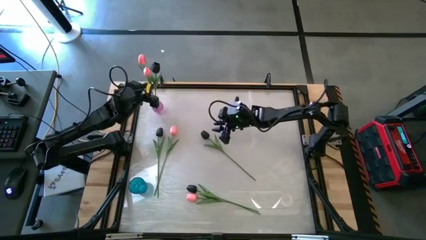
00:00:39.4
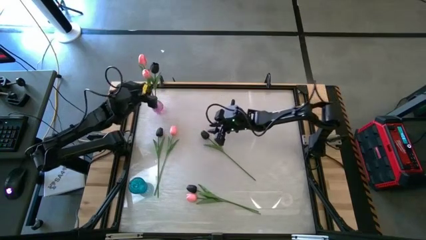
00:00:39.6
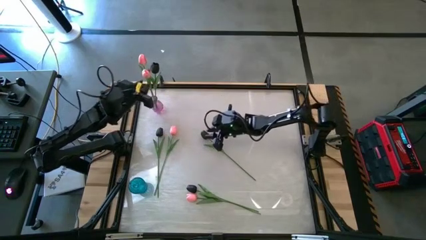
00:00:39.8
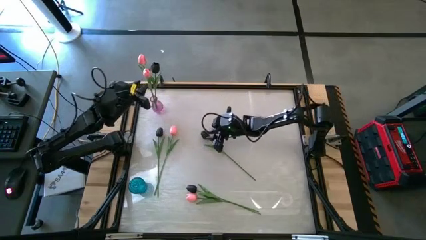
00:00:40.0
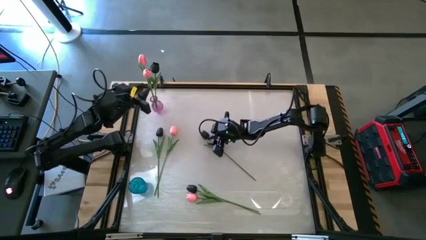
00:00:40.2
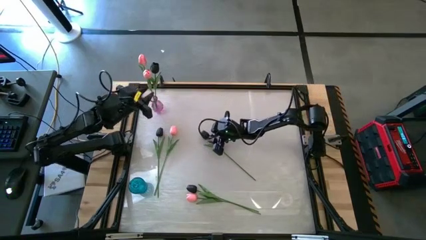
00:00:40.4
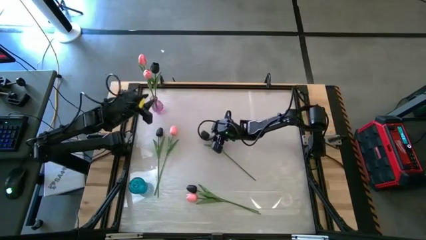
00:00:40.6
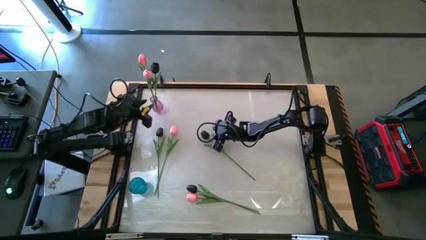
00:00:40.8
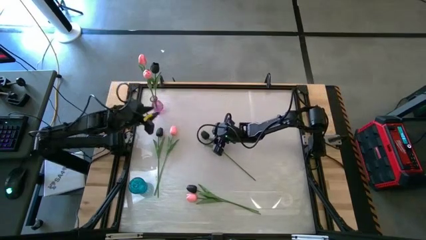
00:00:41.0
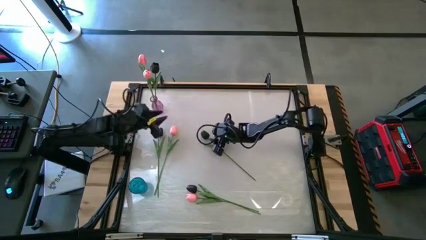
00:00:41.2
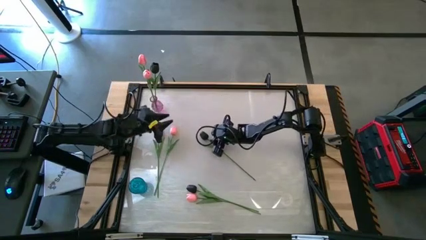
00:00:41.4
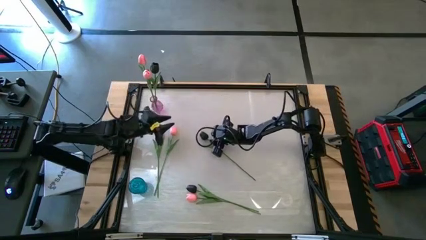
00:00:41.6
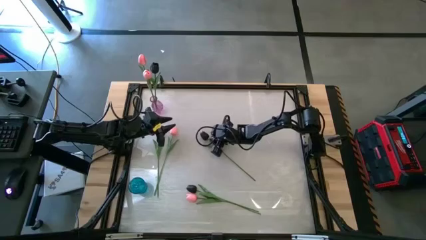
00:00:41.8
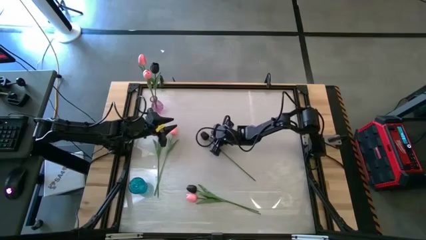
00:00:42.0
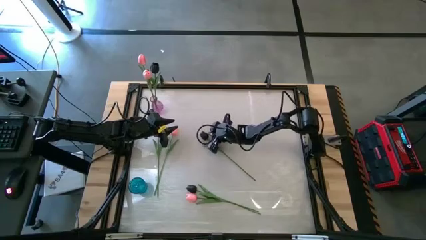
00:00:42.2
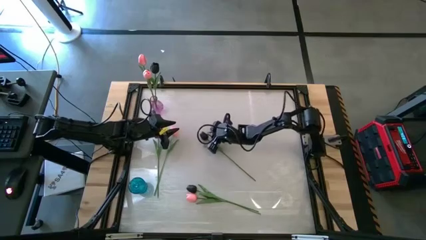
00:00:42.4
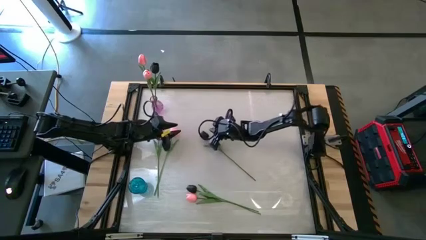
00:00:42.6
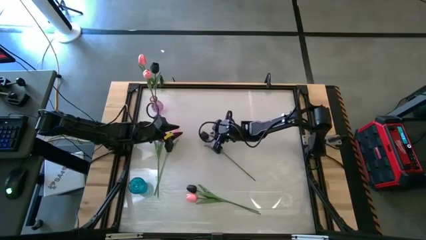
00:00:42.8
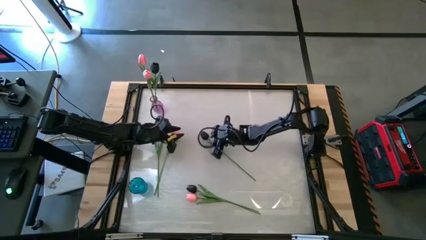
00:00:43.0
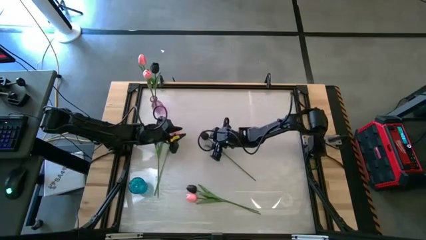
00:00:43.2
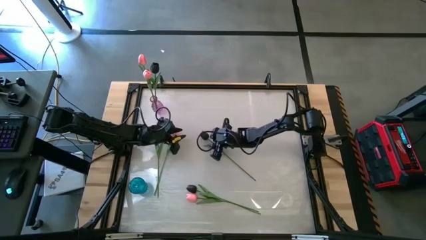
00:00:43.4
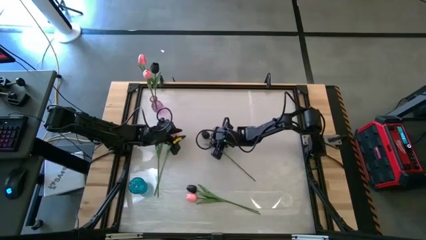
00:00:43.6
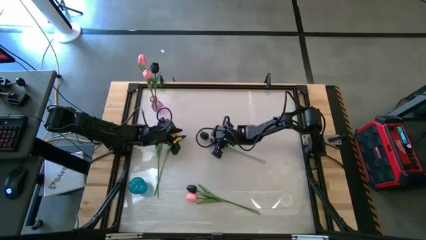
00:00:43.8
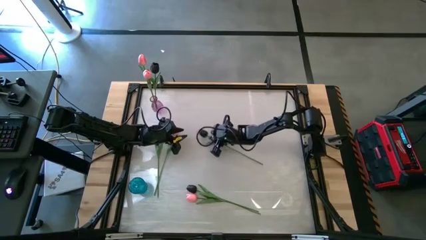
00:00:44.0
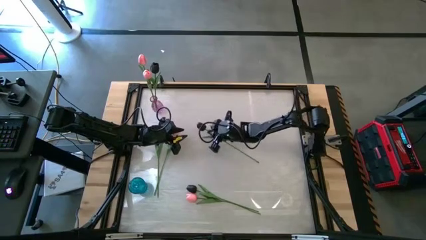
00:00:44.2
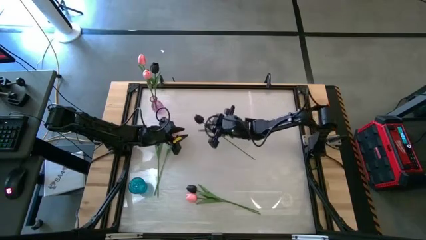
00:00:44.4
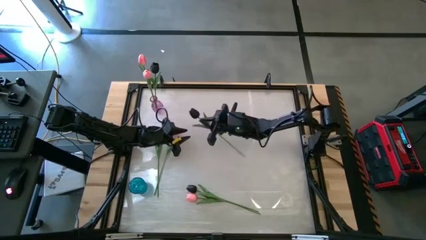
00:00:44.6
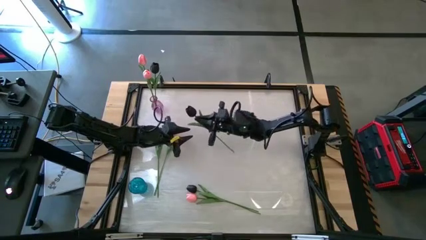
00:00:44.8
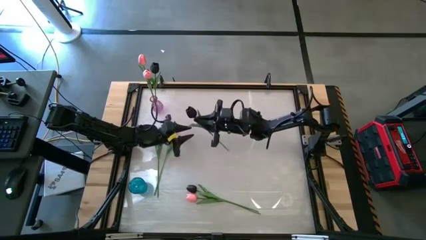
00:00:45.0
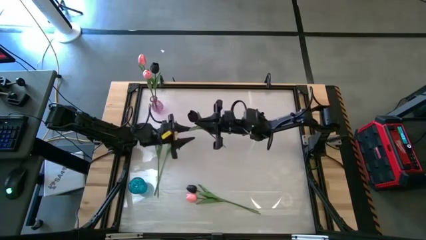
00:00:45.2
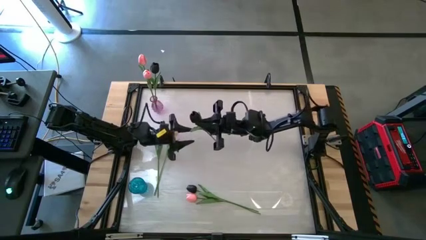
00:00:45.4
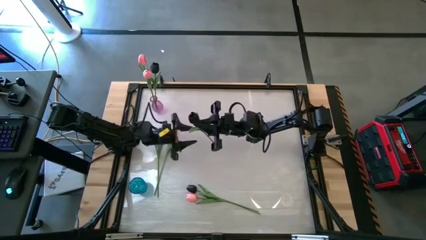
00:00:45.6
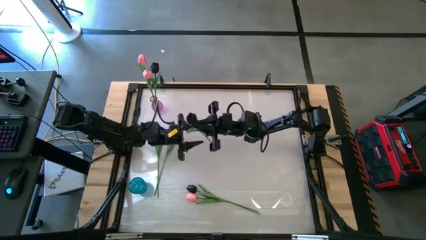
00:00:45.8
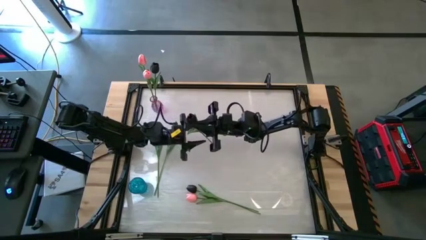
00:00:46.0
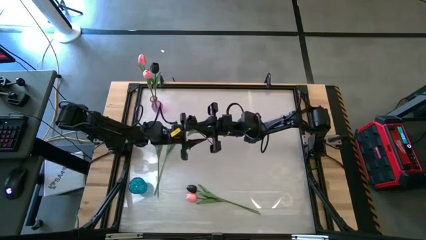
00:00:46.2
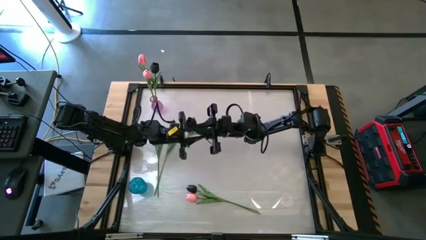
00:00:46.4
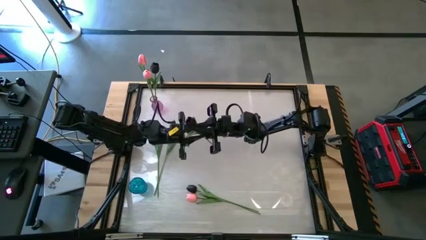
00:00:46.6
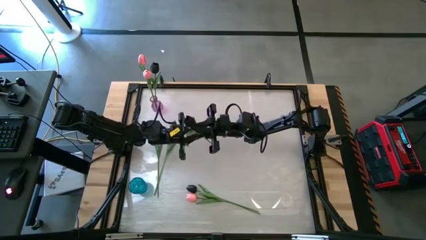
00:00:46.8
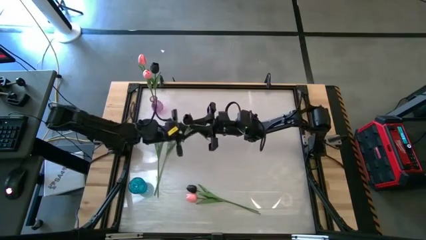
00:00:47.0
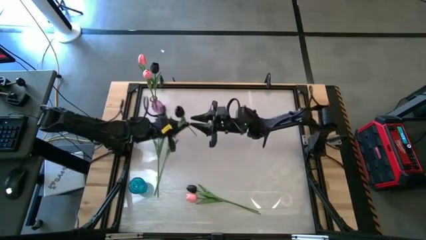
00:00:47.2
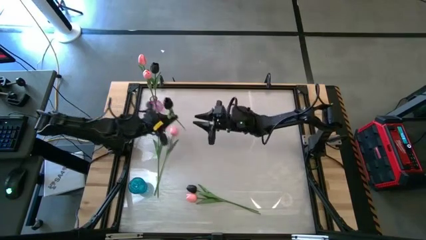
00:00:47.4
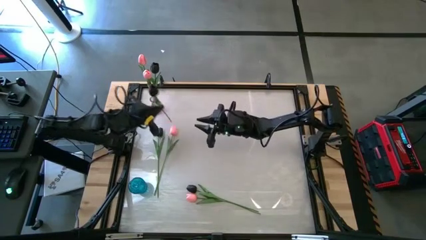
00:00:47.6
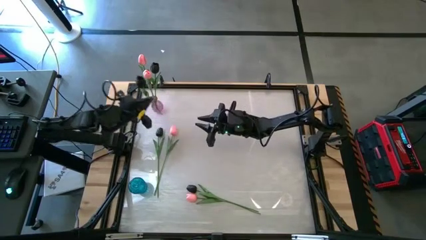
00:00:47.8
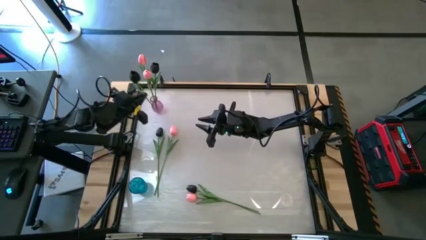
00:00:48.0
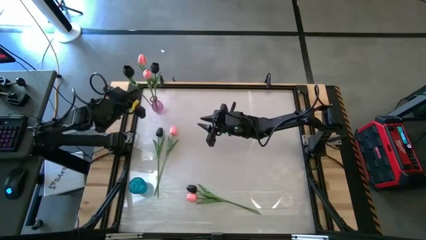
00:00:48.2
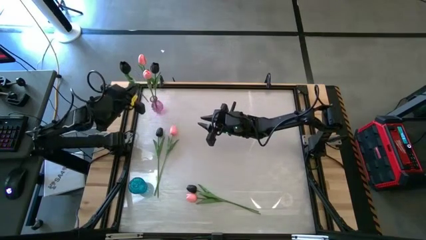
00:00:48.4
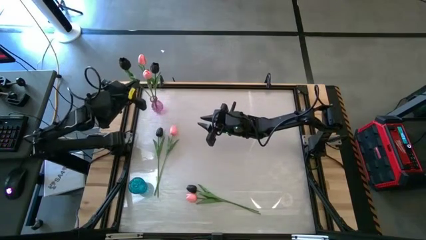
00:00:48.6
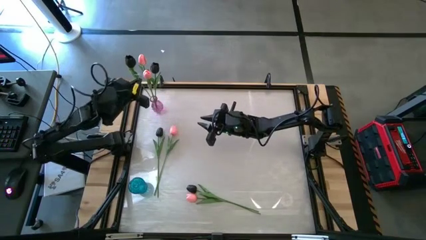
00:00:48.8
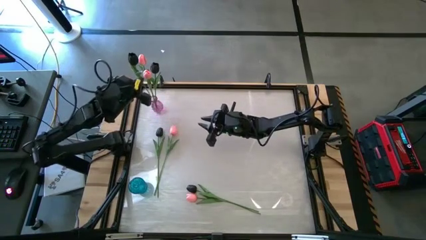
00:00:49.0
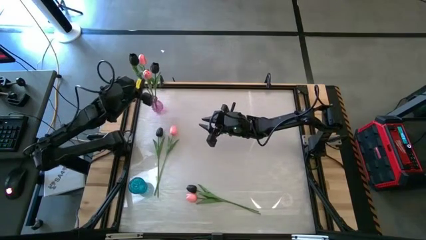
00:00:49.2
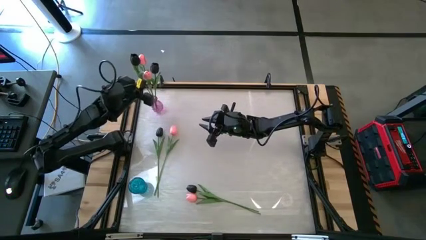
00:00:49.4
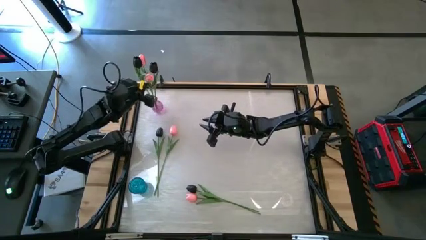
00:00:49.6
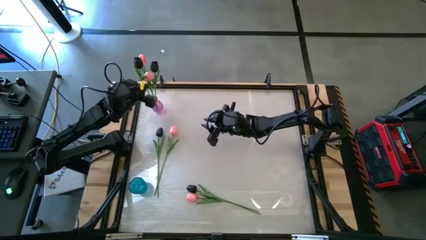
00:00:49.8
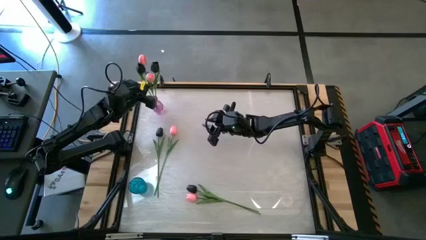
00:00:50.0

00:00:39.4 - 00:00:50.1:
Task: Sort flowers into vase by color
Put the black flower into the purple glass vase
